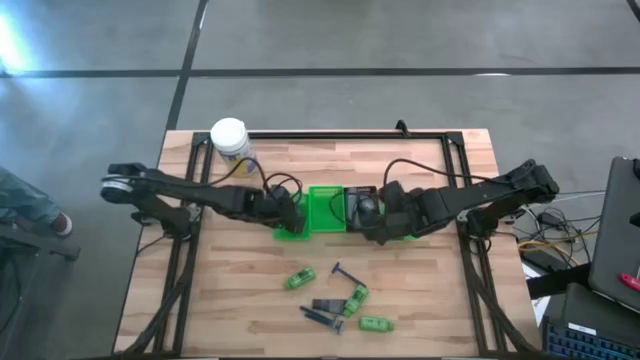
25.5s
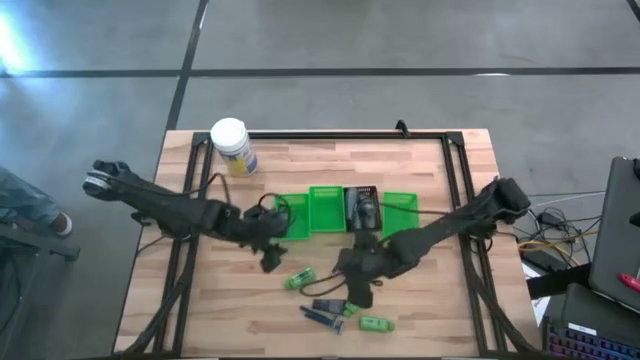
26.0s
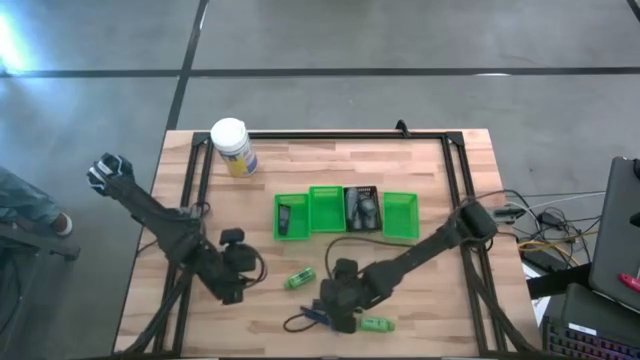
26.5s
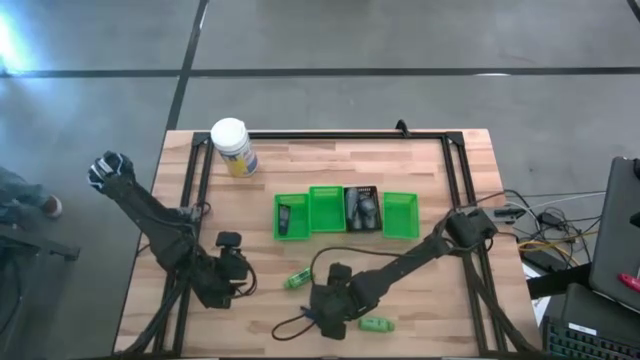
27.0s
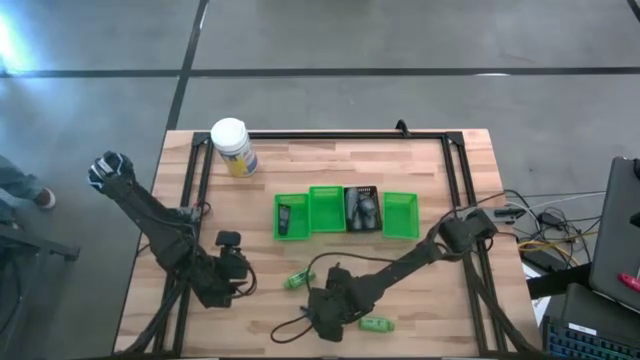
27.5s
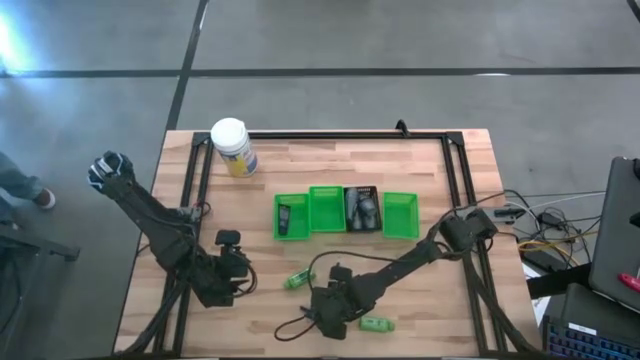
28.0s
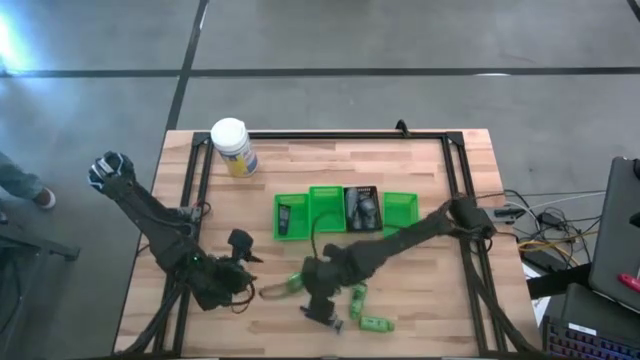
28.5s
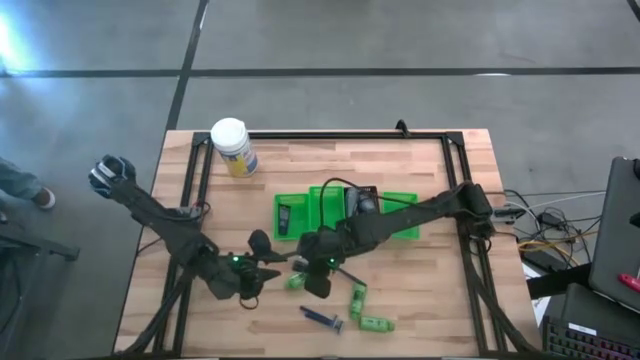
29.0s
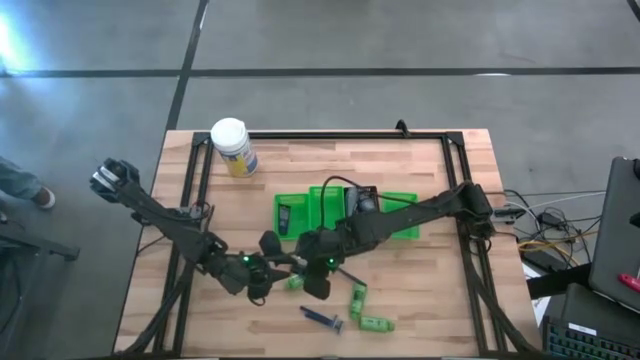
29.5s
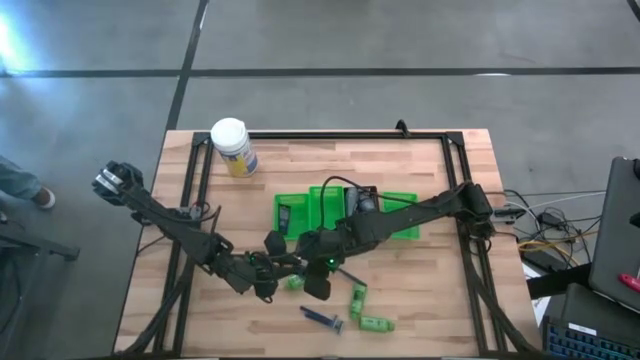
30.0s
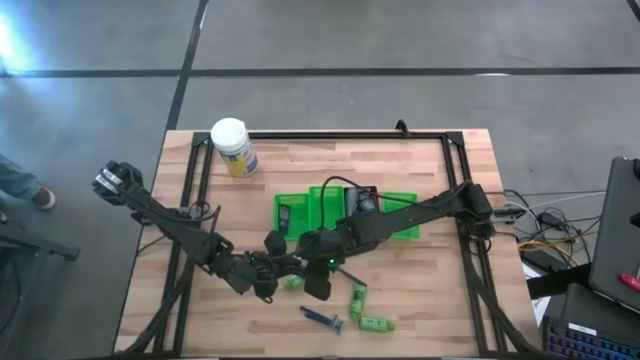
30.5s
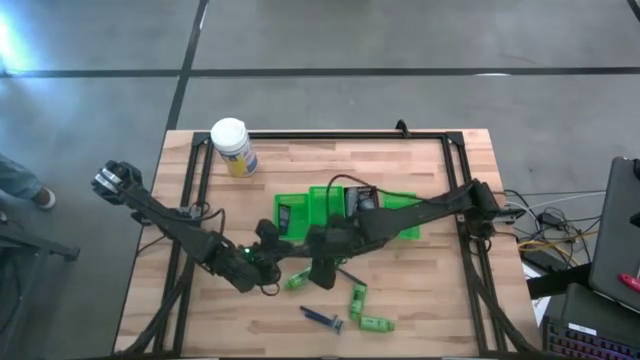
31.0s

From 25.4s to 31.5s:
Task: Pick & Place Travel size toiletries
Put the blue shave butter into the left green bin

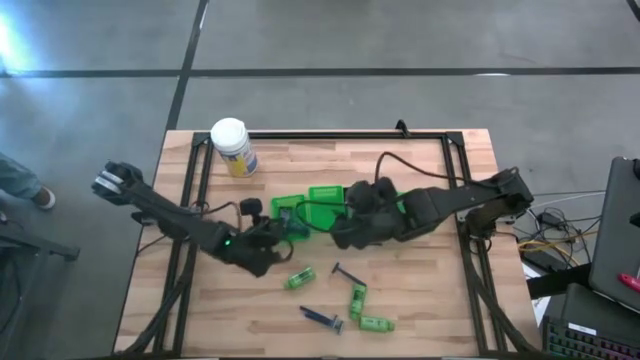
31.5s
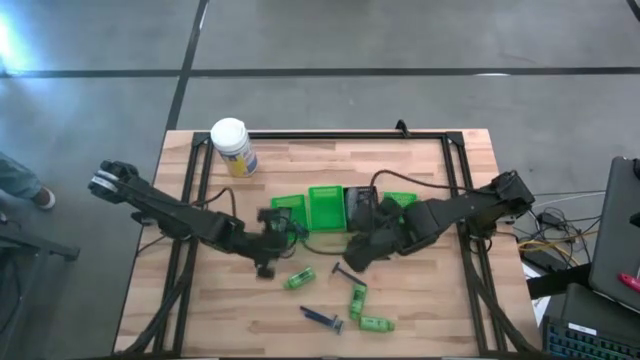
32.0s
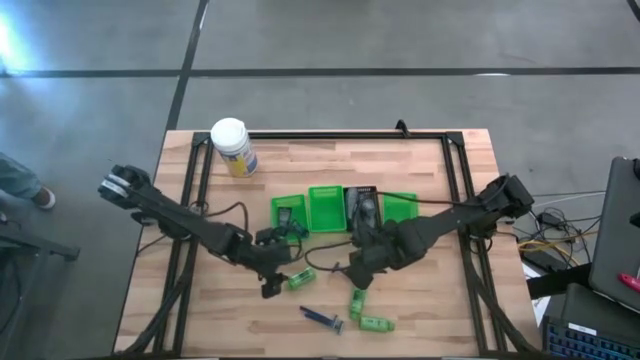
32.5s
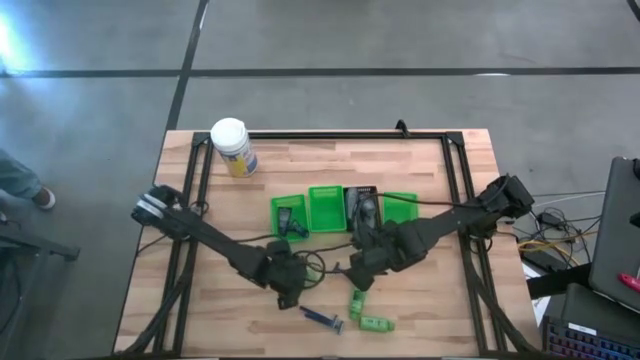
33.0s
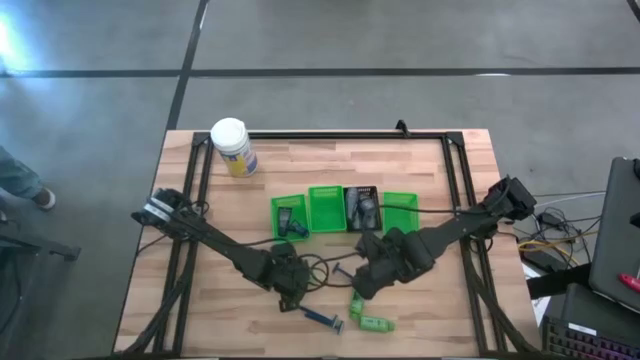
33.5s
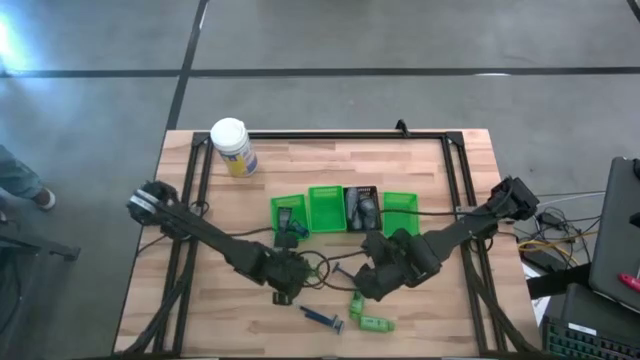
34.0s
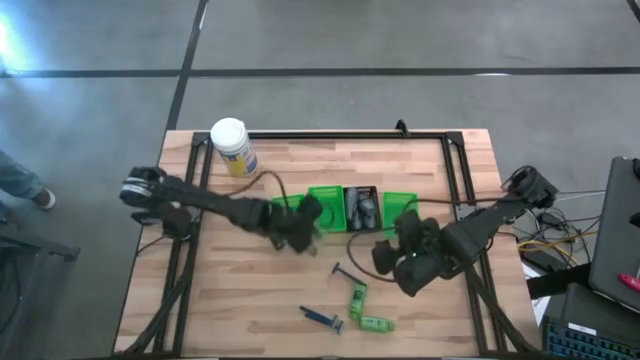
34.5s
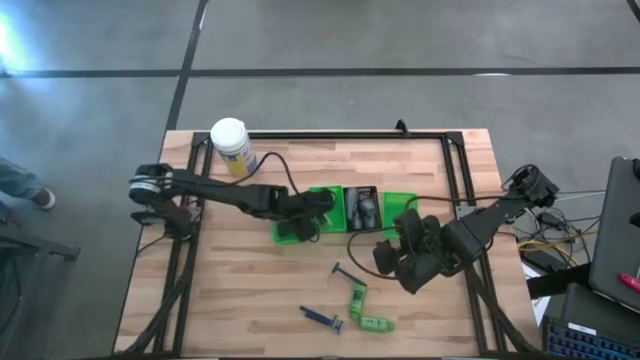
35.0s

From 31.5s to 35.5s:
Put the green shampoo bottle into the middle green bin

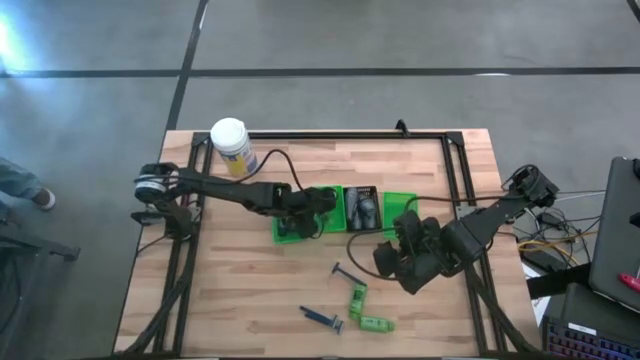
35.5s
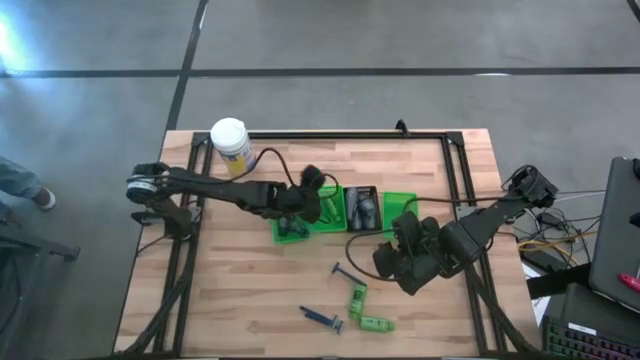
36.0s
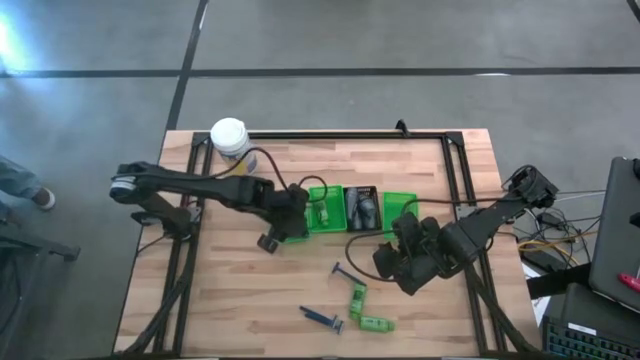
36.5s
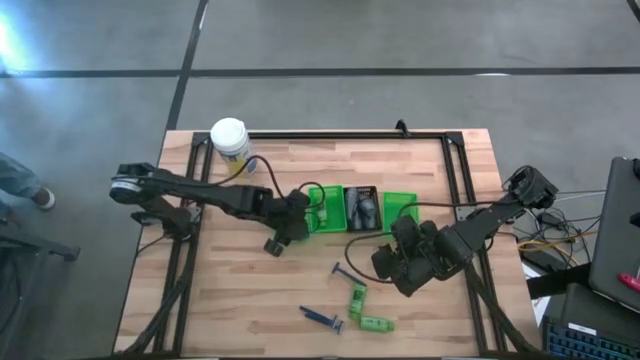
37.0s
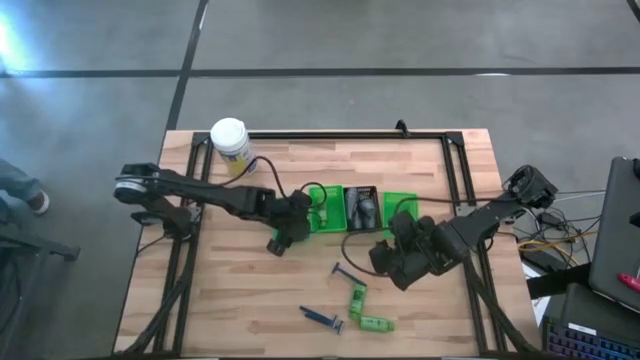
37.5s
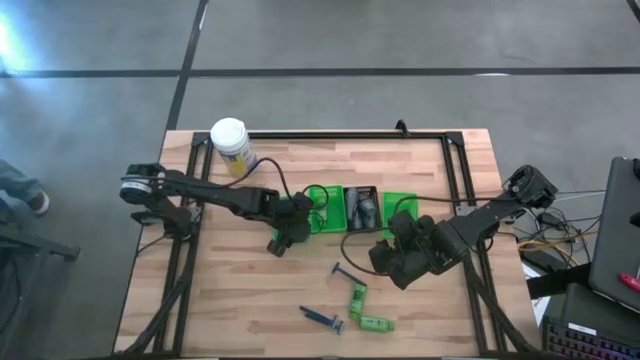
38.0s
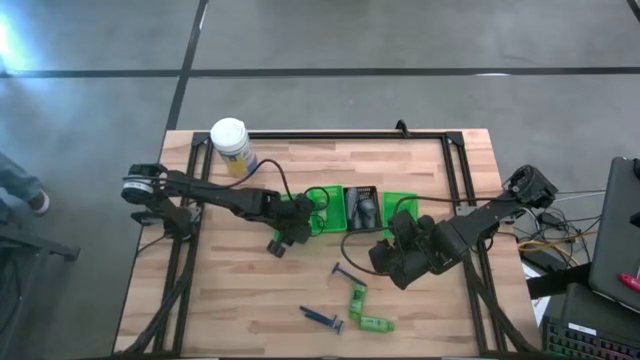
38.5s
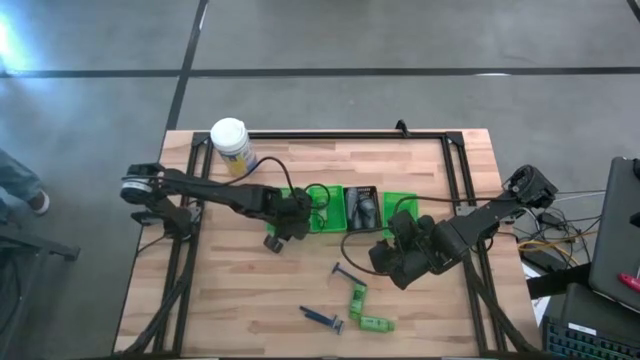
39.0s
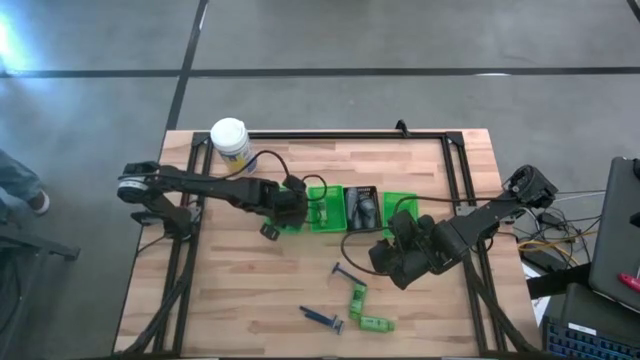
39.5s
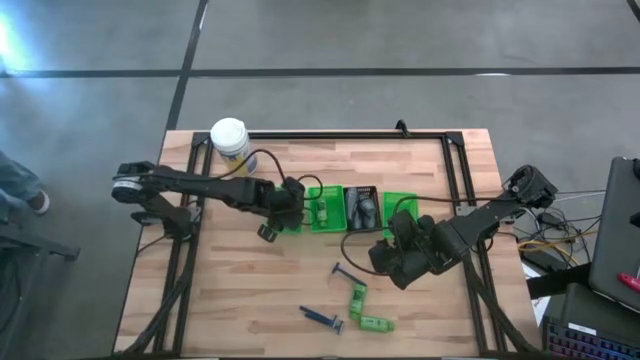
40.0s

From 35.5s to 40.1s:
Adjust the blue shave butter in the green bin

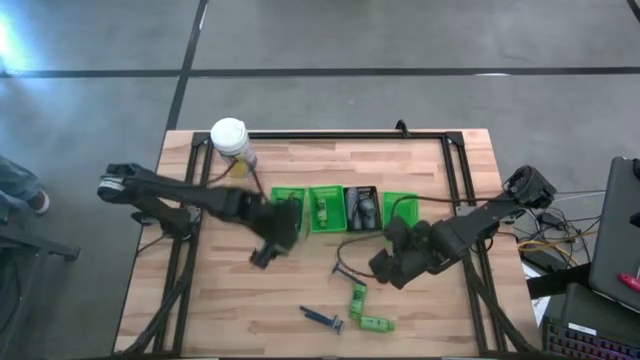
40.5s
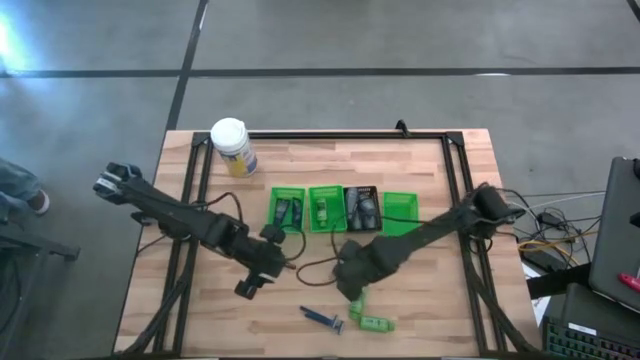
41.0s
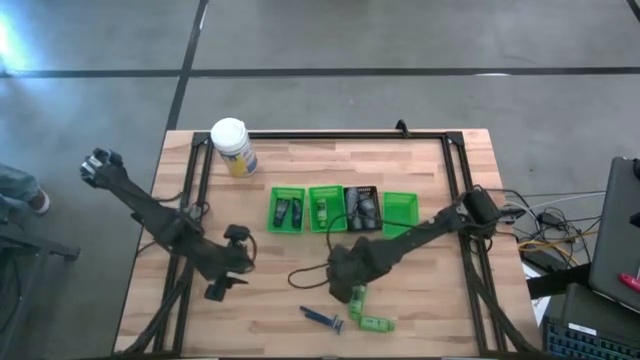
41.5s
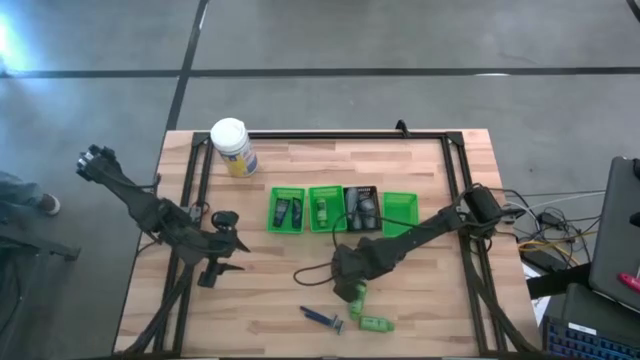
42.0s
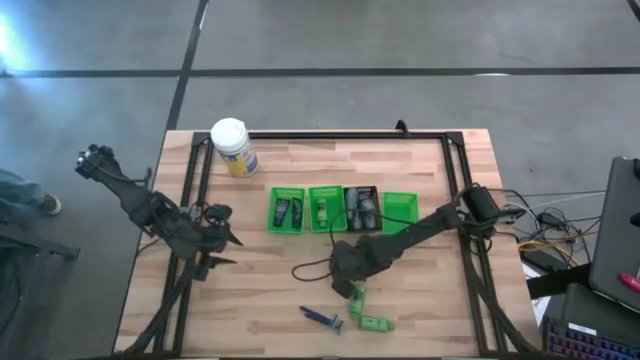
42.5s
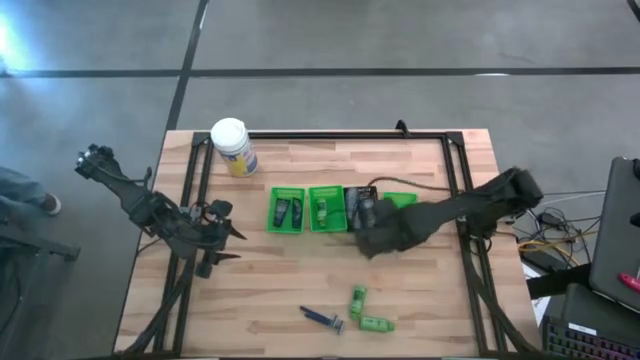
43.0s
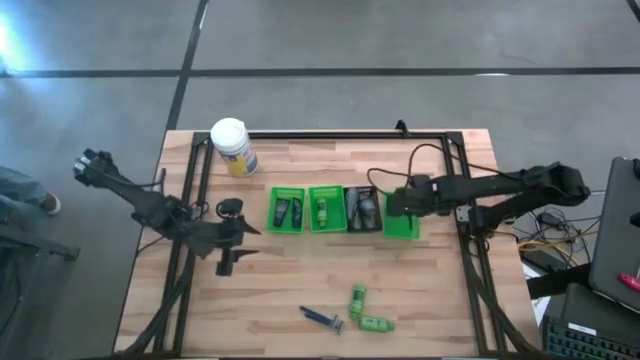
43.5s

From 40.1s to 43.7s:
Put the razor into the right green bin
